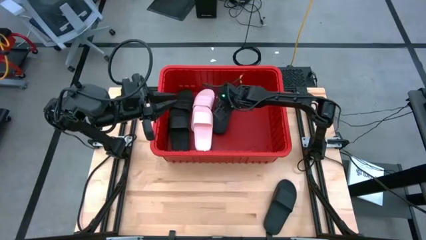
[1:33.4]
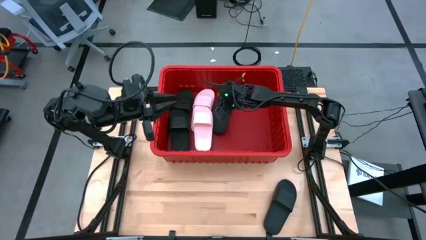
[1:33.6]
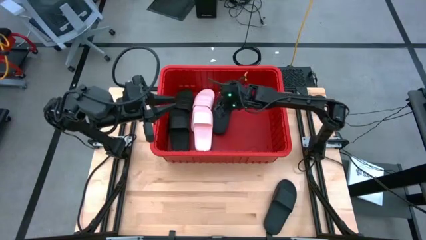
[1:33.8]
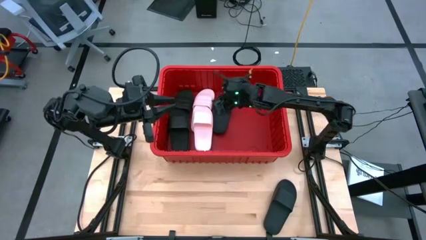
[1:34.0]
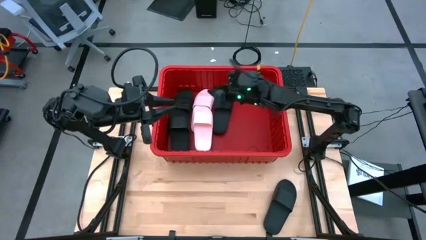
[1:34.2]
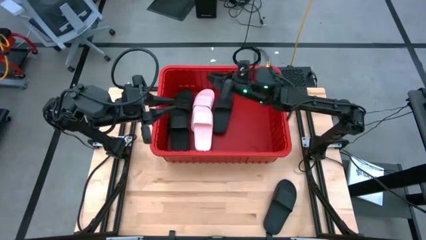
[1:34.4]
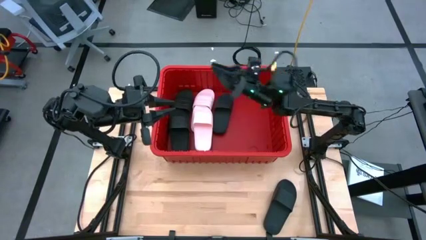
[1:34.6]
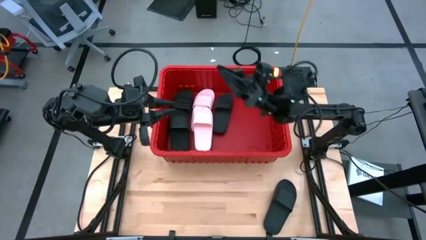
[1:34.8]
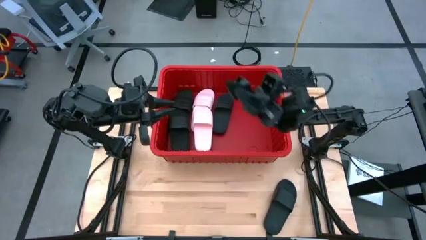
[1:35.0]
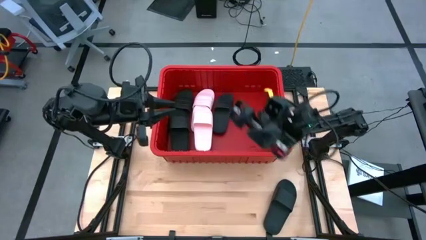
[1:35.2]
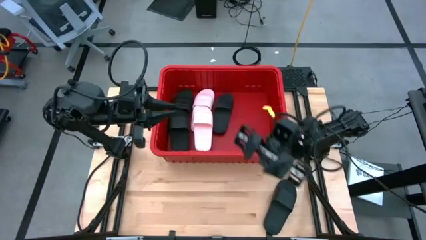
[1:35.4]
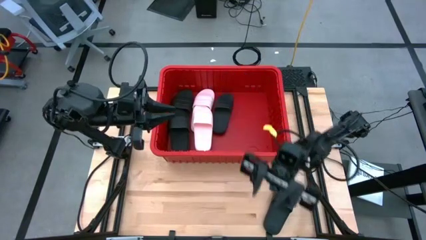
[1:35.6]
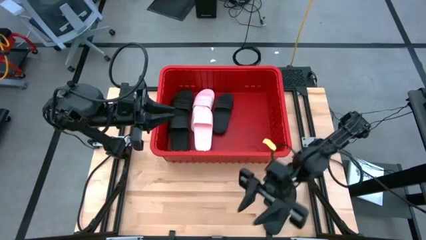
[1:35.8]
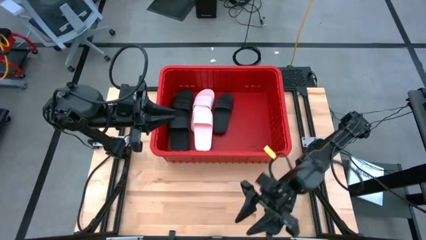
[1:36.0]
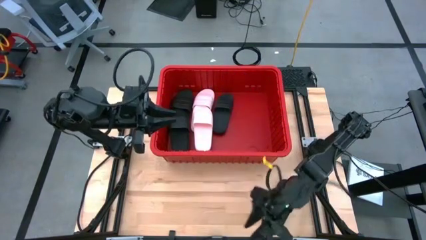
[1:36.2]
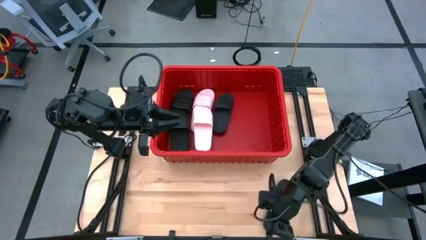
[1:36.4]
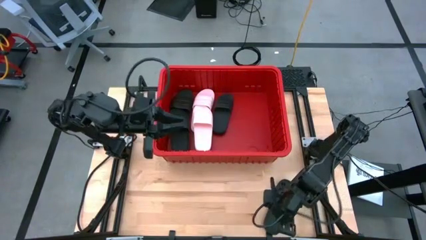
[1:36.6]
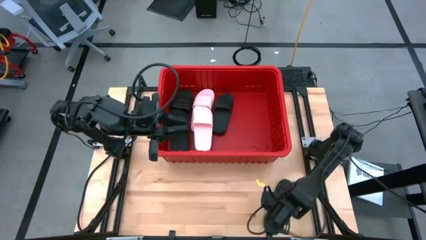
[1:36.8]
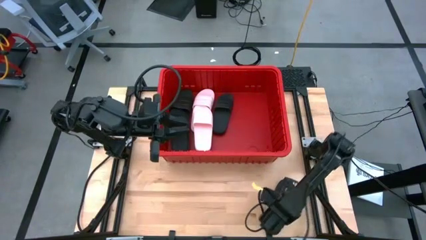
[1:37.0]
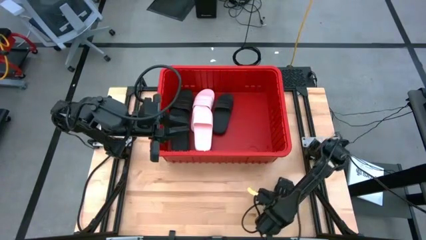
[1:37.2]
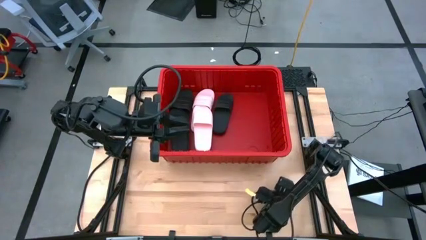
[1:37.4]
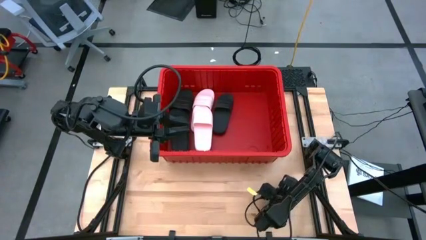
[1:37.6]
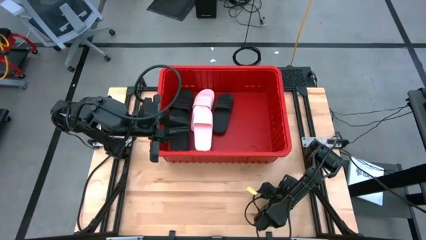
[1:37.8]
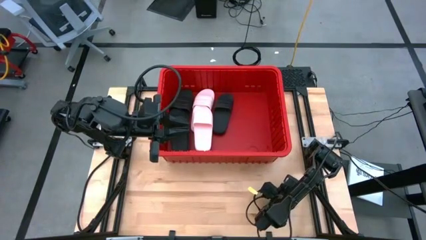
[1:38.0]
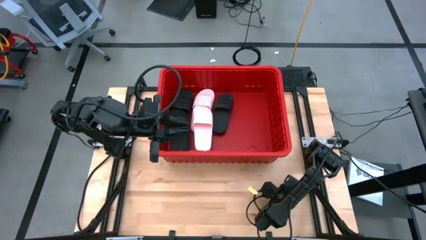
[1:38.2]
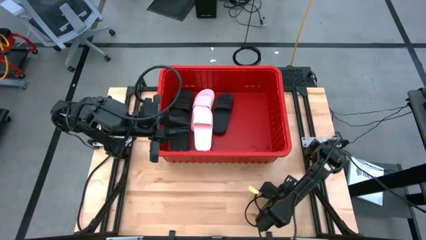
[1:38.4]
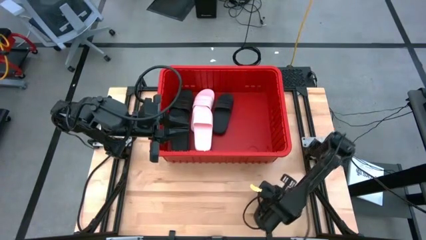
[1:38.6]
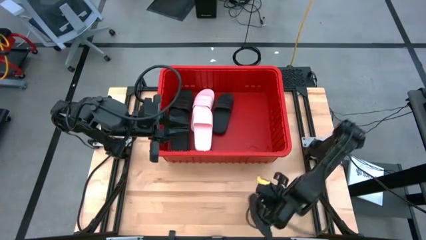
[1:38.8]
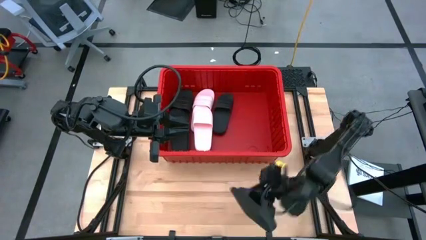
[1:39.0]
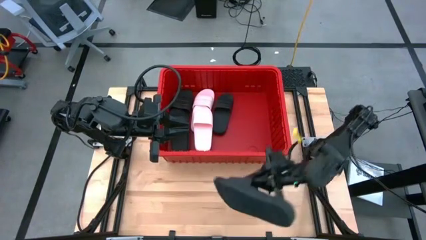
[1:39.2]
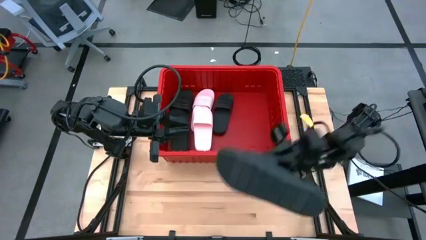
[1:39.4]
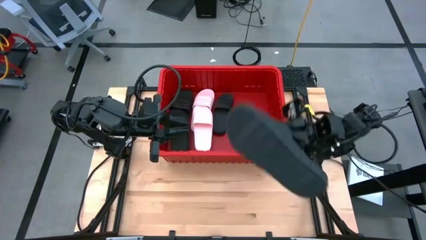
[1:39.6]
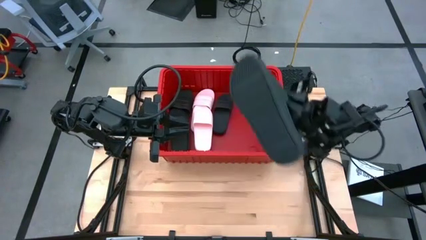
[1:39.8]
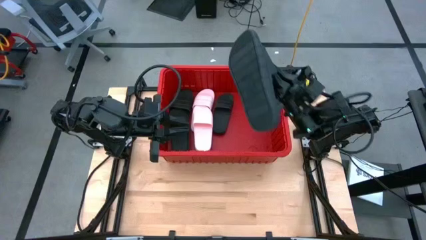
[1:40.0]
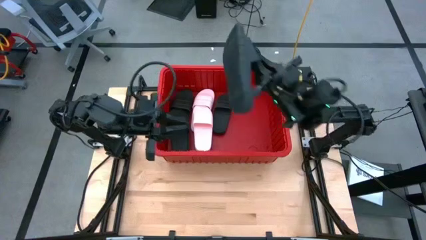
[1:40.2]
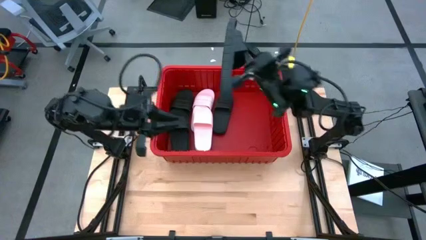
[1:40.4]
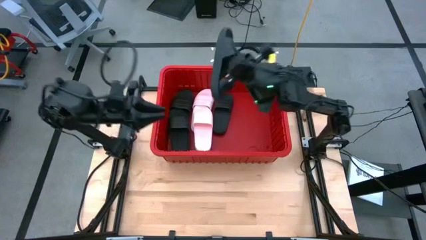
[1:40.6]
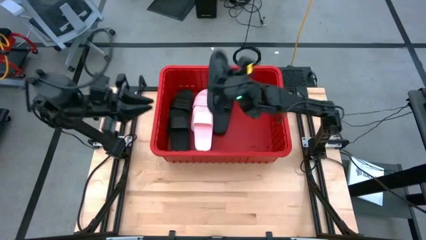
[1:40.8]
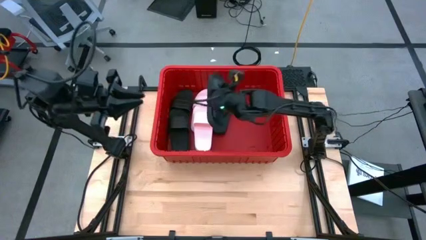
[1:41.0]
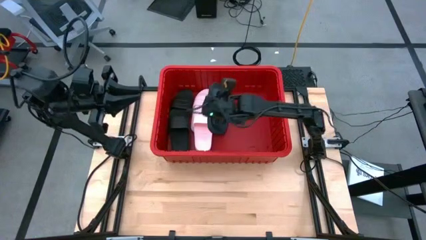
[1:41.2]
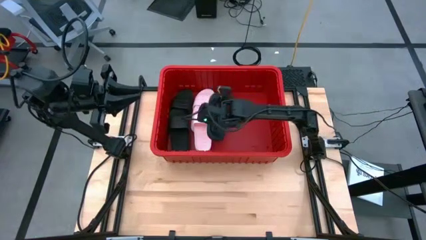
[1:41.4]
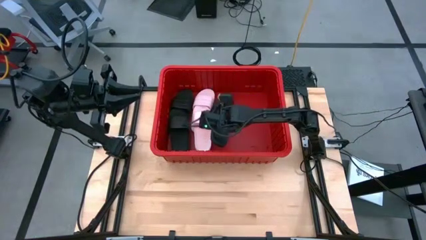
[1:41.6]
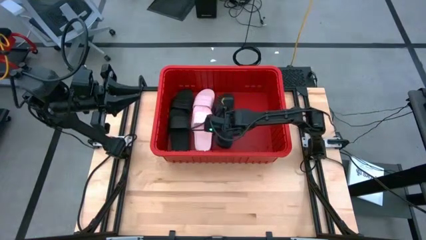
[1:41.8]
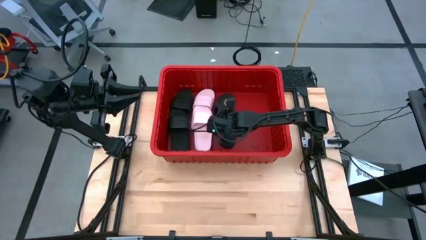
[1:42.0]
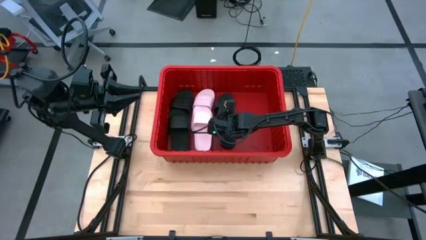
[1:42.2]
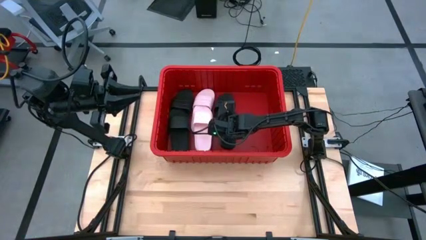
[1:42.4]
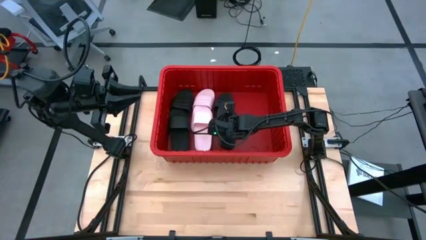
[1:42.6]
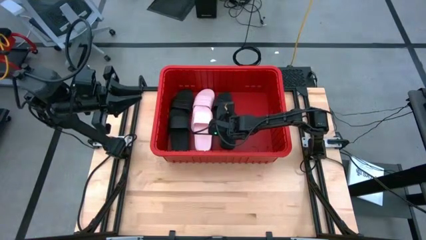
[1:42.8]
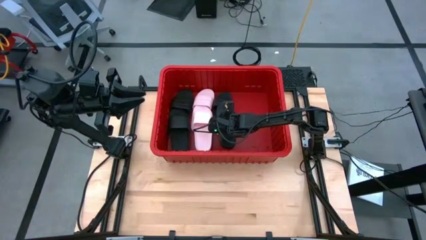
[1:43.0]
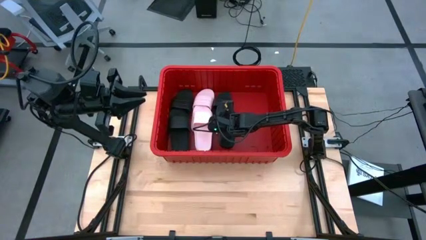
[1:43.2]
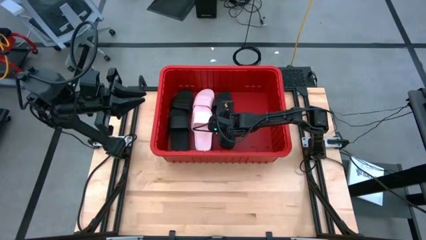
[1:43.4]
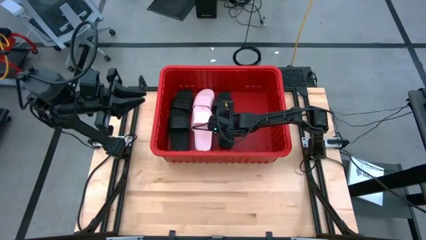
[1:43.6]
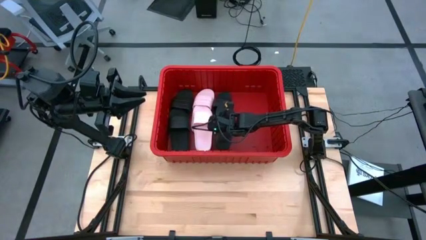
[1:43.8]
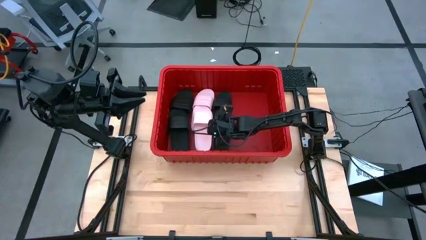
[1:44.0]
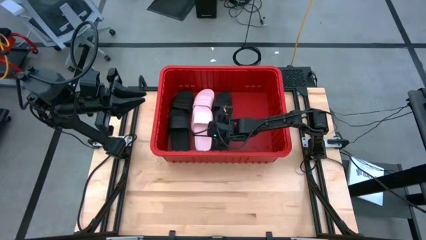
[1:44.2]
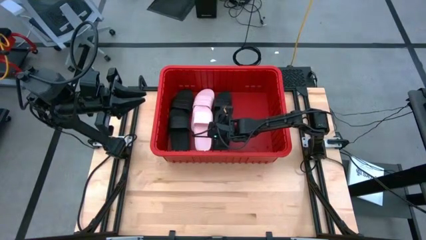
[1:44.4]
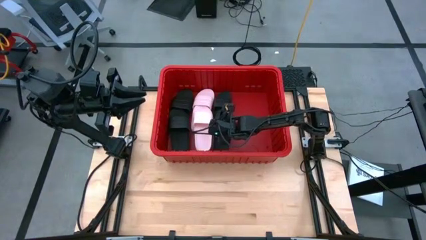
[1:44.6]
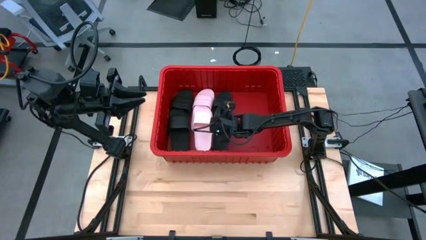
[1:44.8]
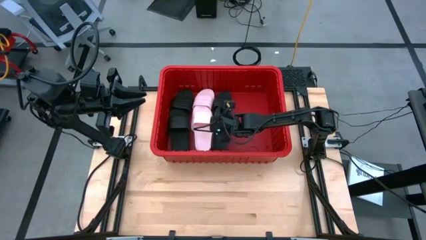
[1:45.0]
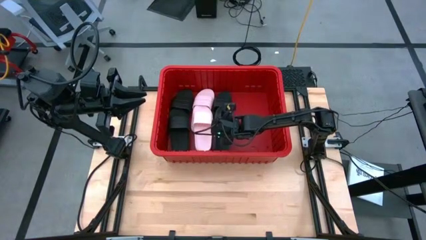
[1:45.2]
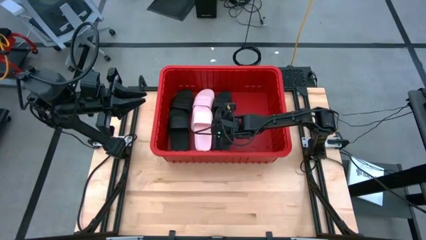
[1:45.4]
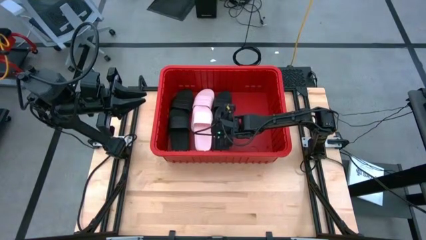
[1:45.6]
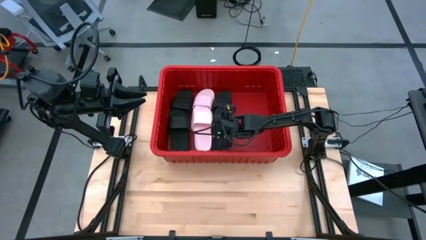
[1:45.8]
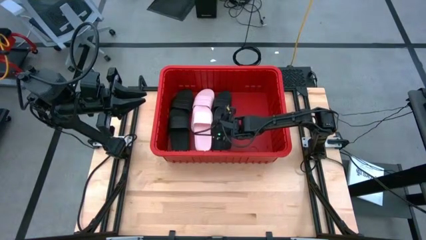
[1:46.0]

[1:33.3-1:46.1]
Task: Pick and place slides into bin
Put the black slide into the red bin
